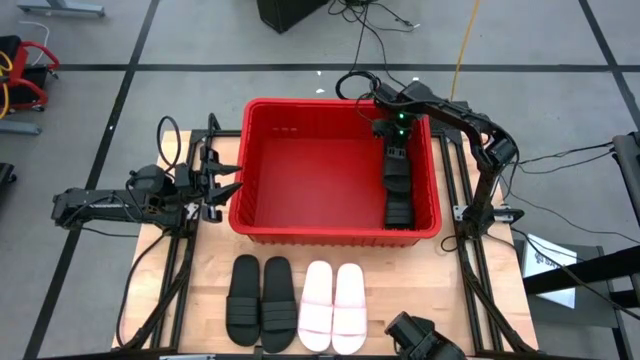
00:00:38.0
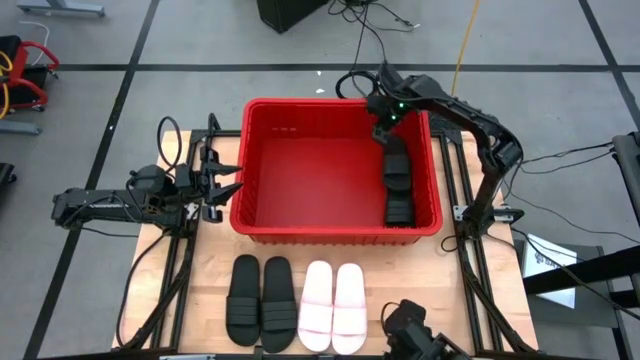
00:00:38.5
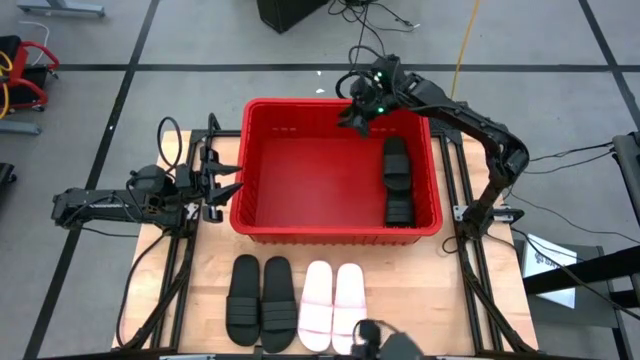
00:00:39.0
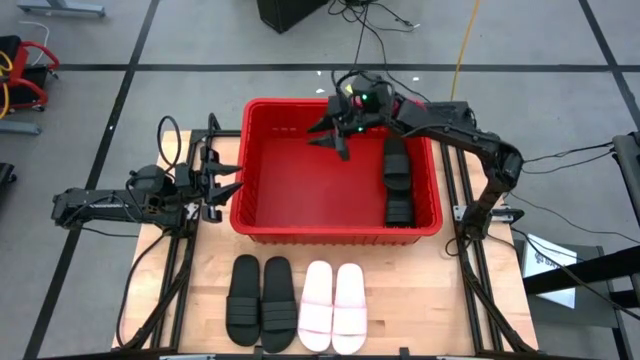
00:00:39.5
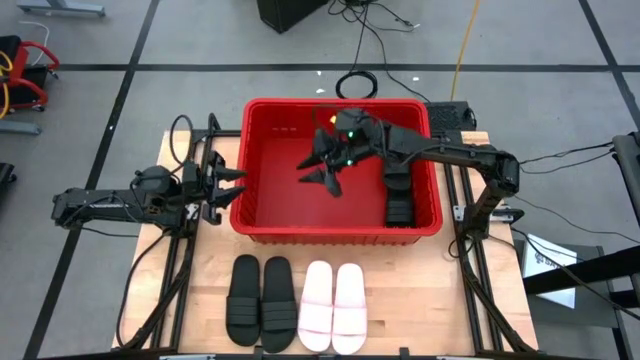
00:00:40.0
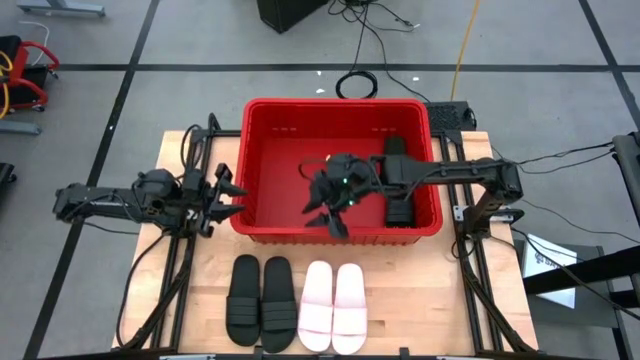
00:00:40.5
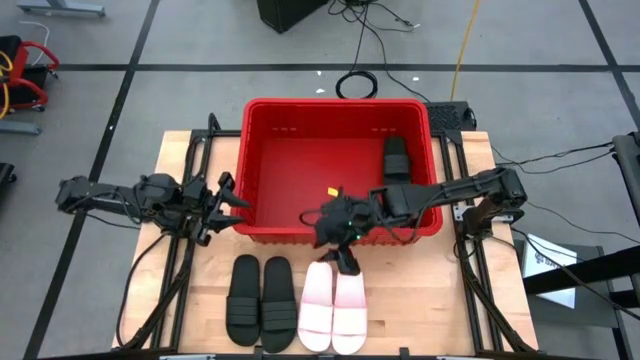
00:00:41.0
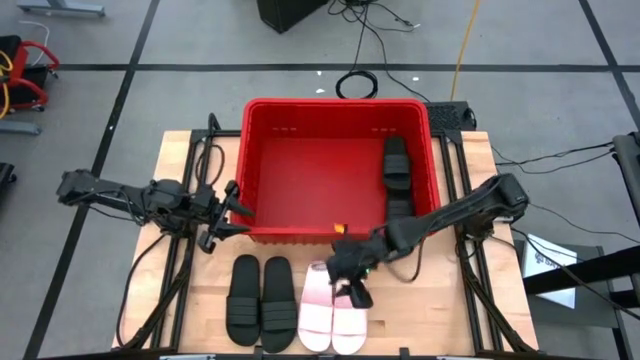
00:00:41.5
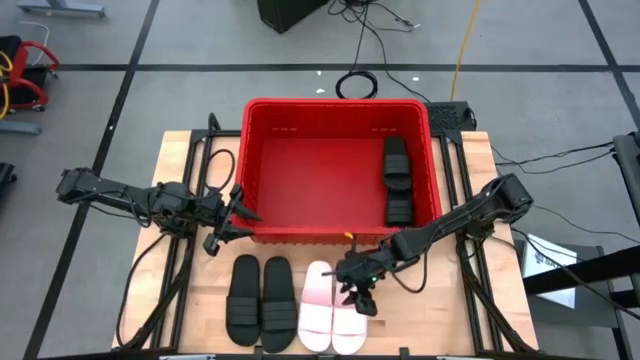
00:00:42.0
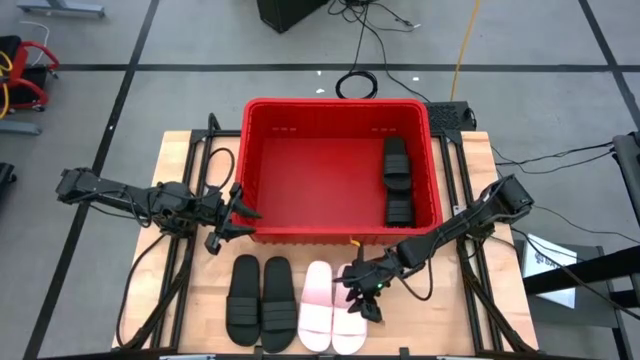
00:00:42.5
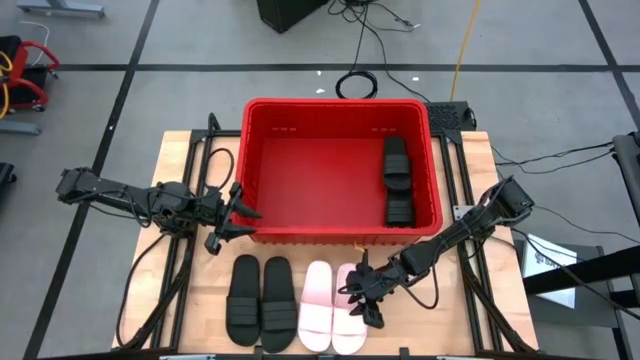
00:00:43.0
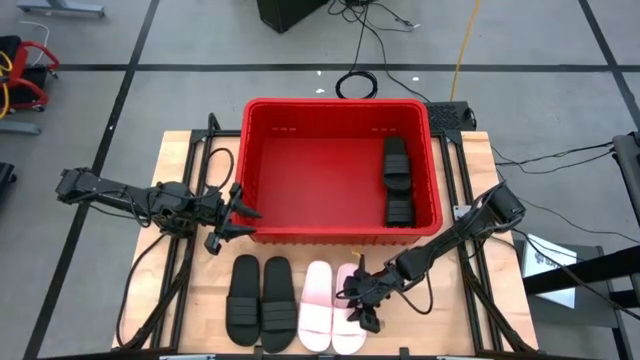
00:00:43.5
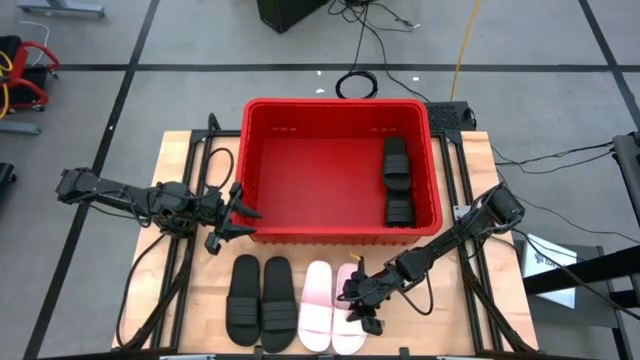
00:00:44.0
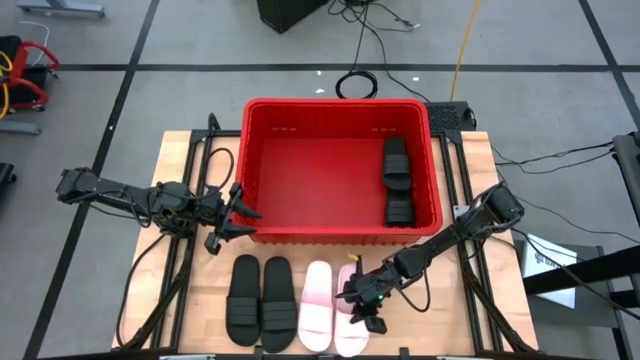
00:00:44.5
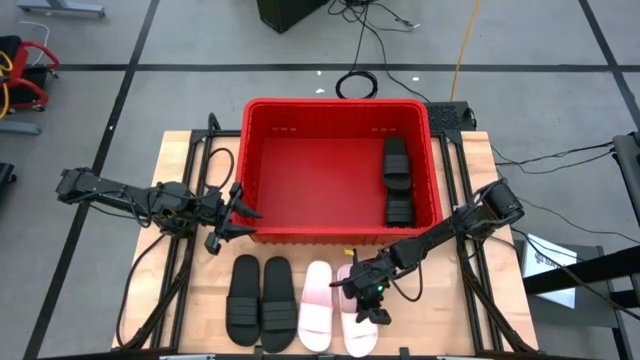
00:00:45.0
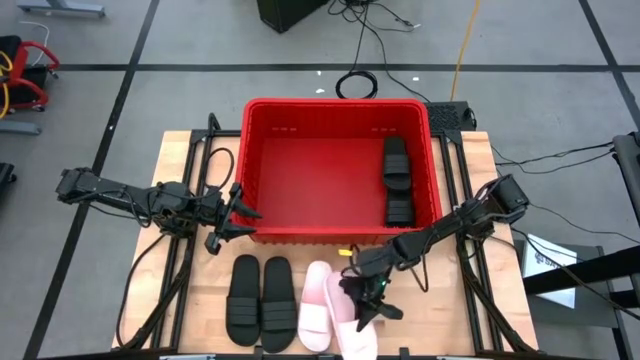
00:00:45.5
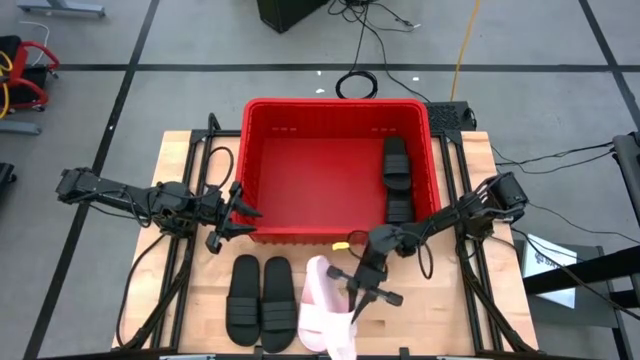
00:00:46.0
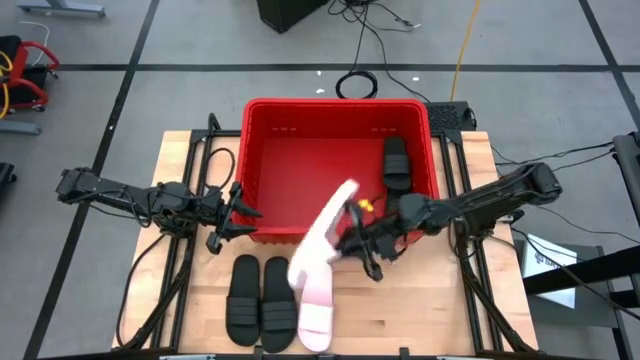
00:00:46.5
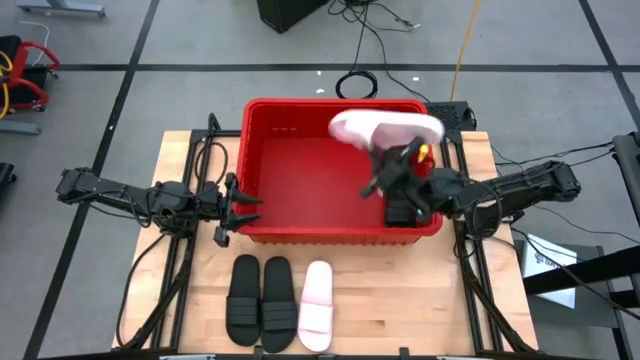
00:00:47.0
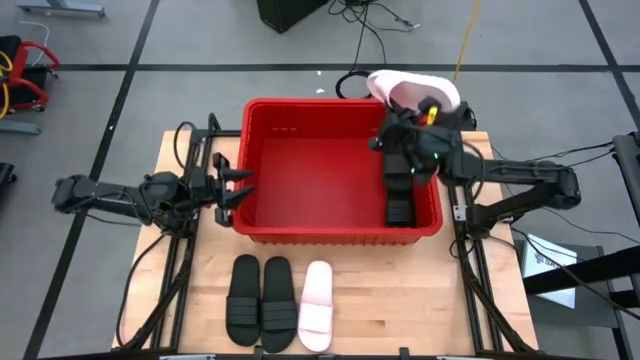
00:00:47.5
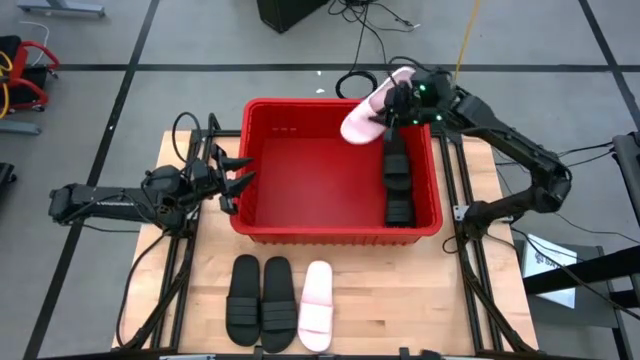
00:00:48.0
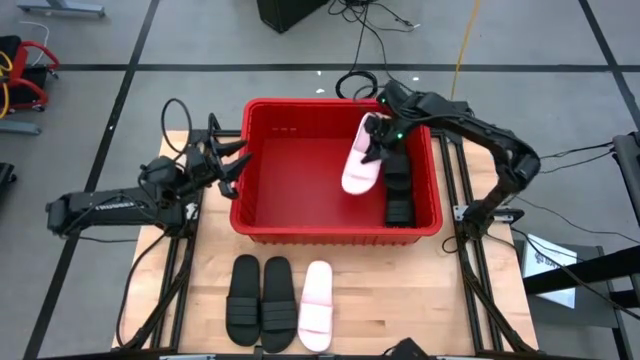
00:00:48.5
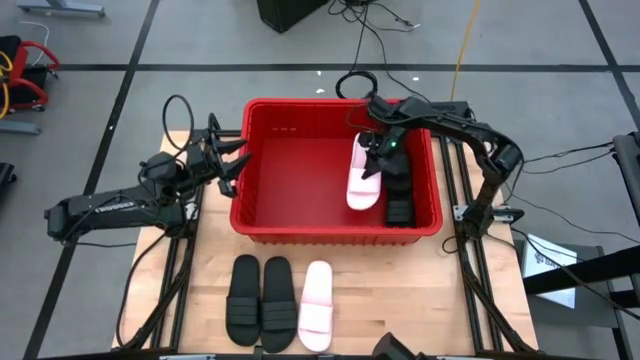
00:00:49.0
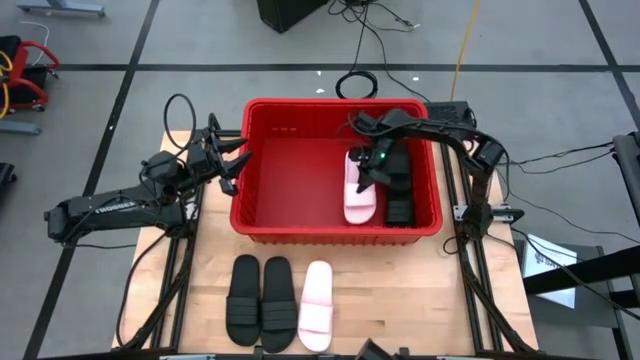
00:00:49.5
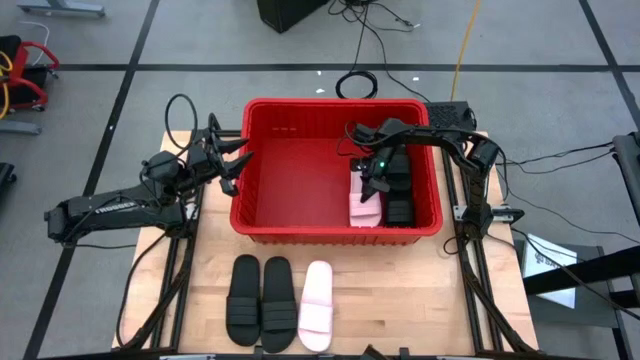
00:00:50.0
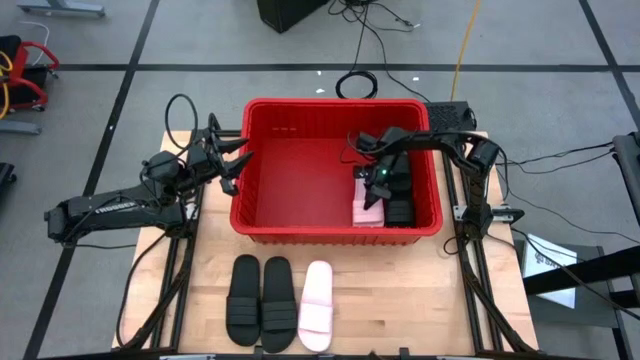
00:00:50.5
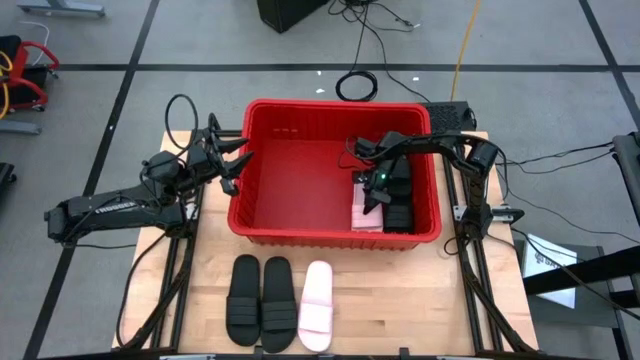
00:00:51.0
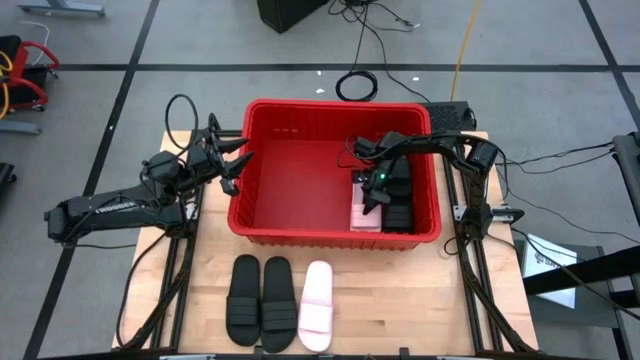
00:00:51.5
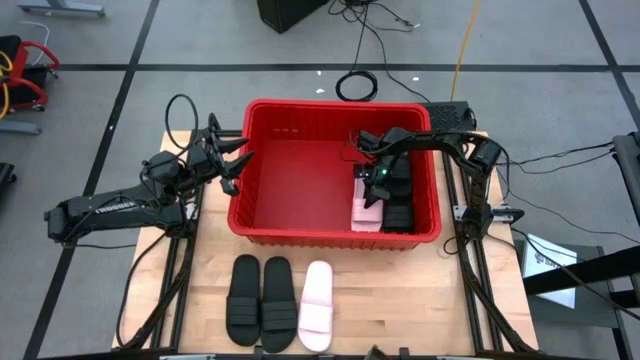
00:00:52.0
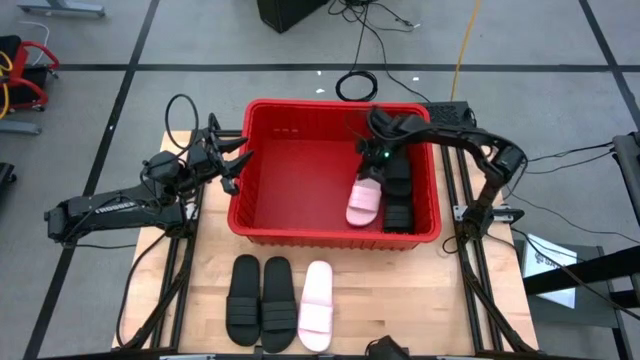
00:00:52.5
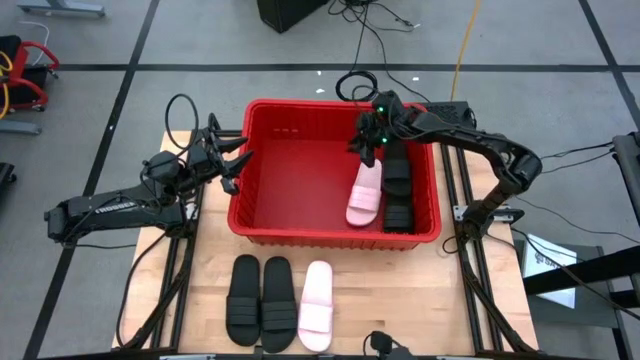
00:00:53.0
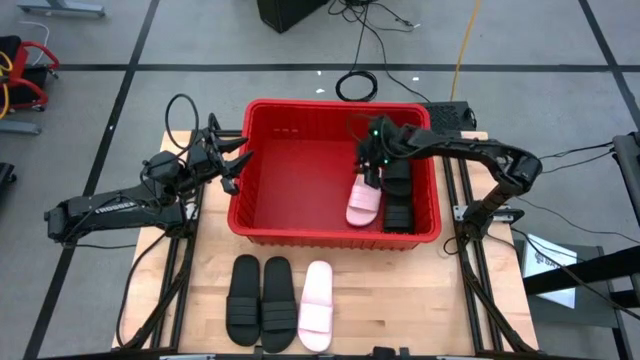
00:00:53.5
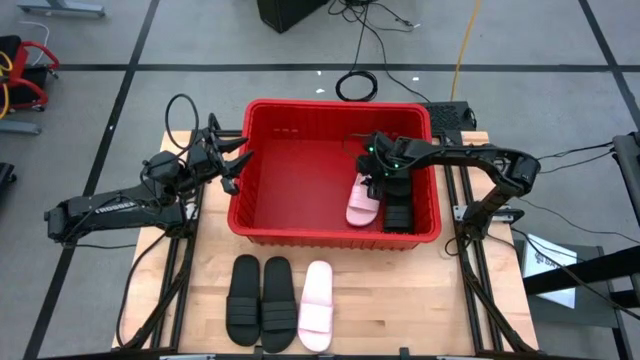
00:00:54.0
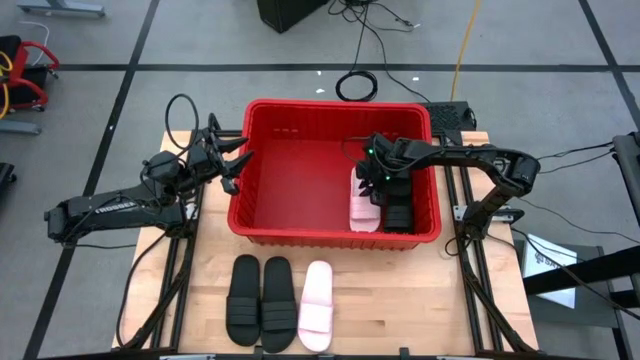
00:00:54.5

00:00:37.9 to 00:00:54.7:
Task: Pick and place slides into bin
Put the right white slide into the red bin

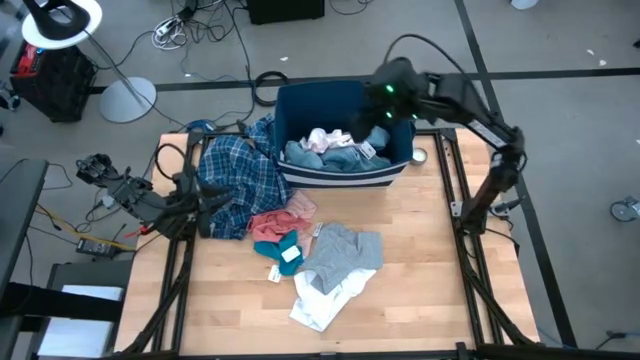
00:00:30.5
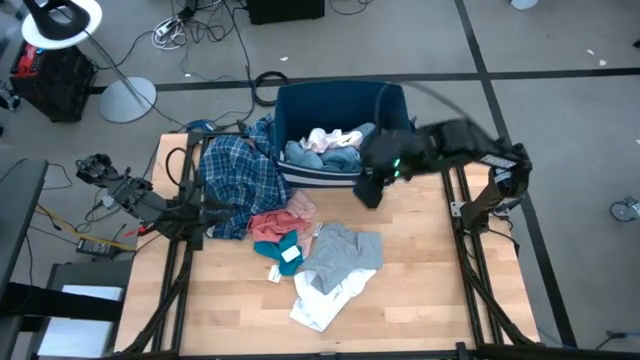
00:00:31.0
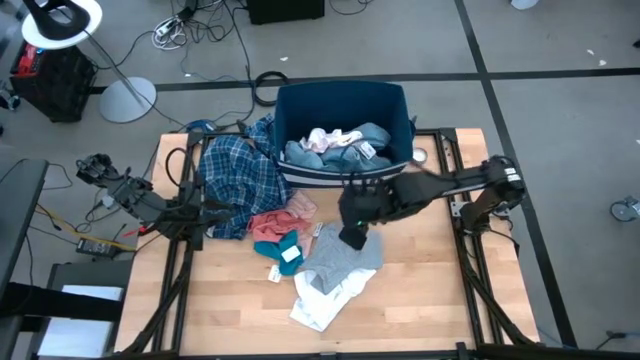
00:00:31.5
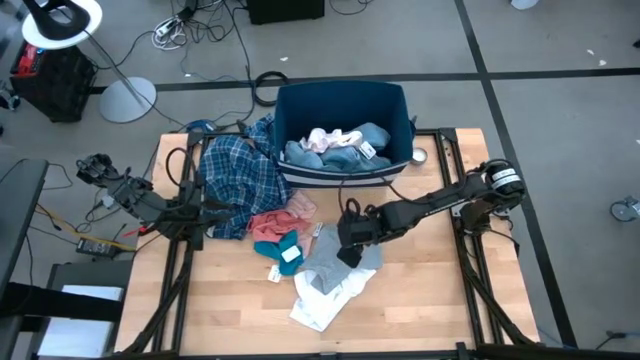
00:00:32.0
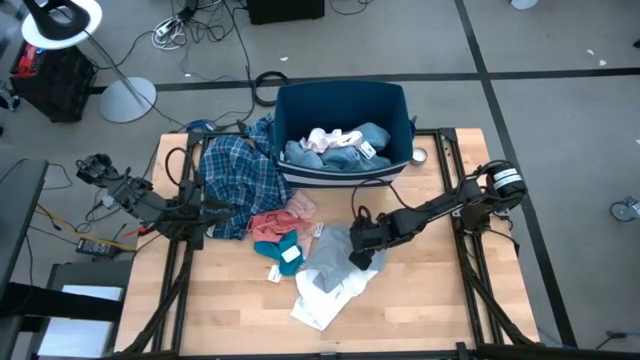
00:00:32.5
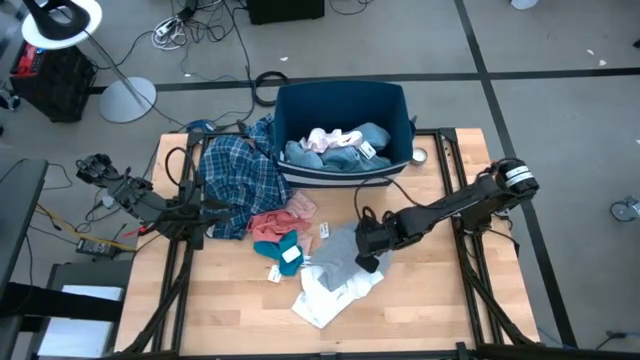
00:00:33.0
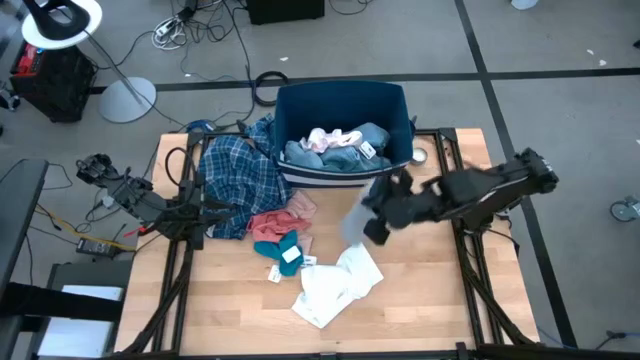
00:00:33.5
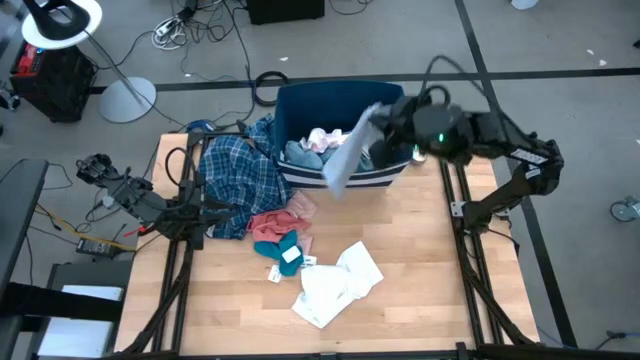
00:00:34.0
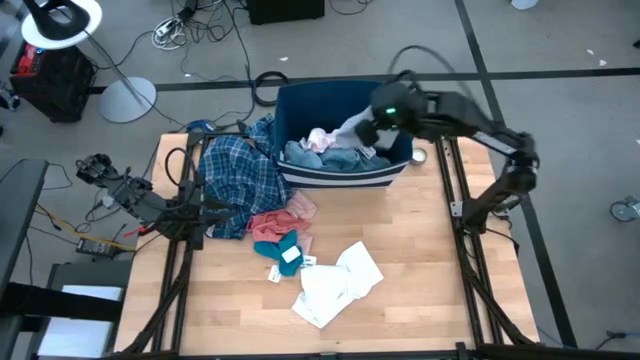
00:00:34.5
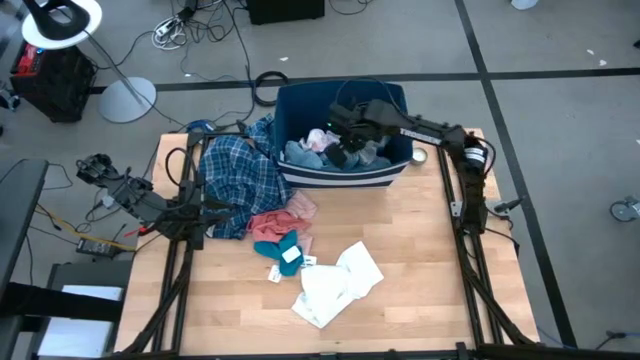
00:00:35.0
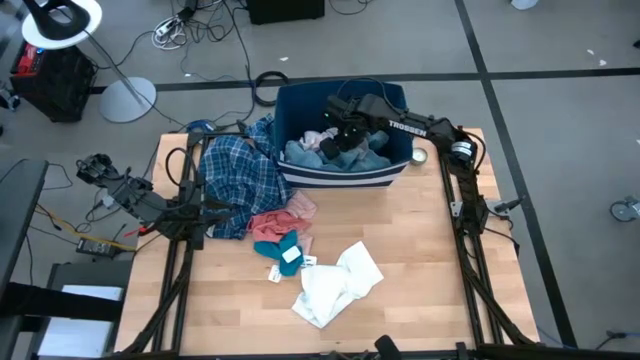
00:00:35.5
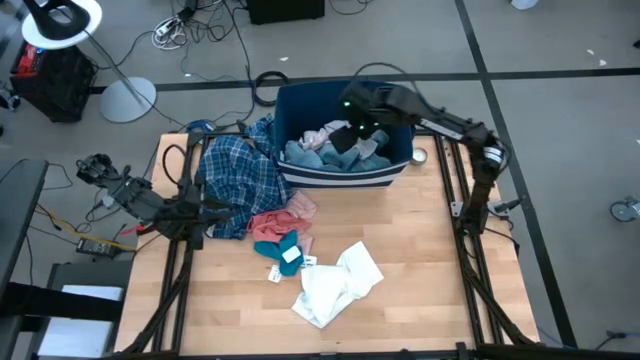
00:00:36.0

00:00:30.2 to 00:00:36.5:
Task: Sort clothes
Put the gray shorts into the blue bin
